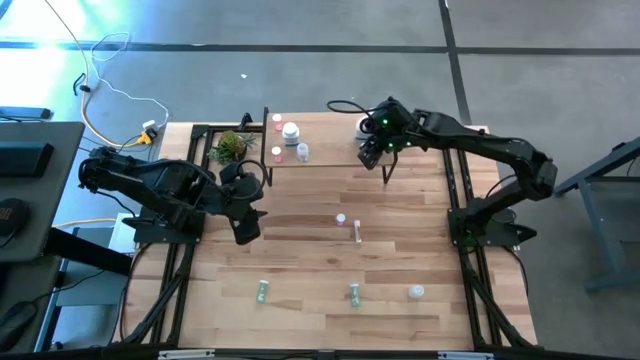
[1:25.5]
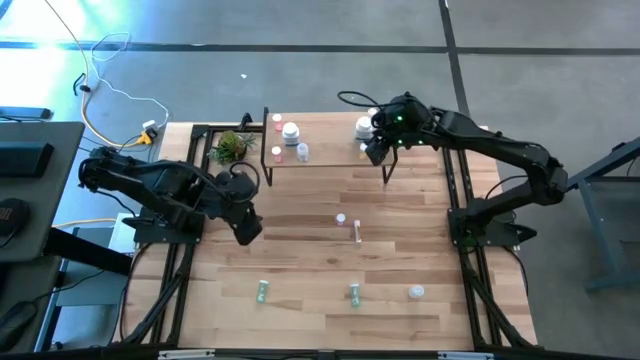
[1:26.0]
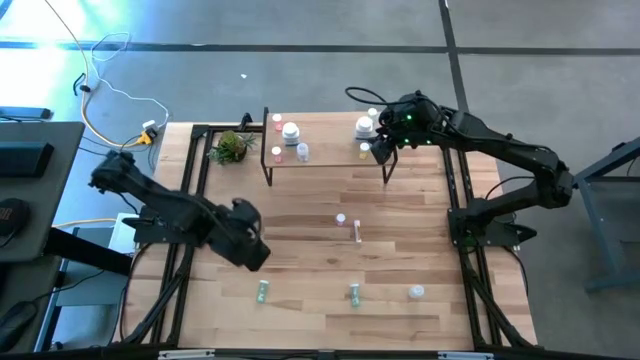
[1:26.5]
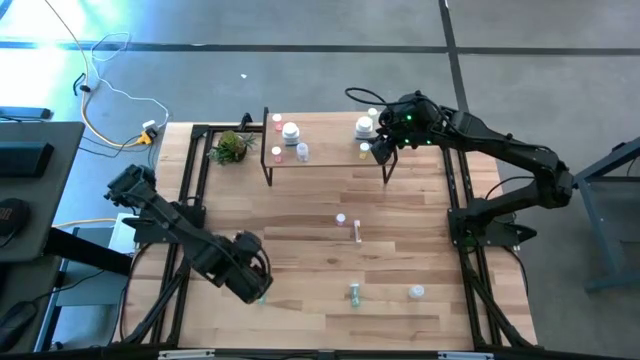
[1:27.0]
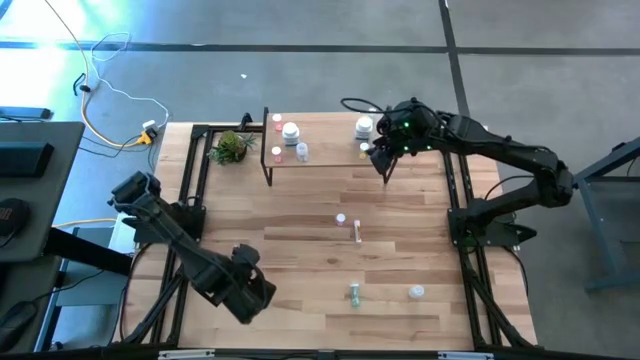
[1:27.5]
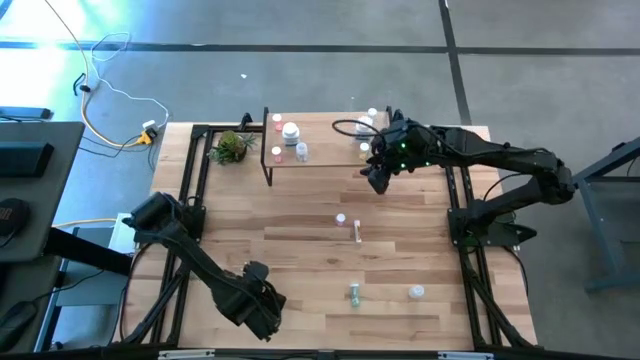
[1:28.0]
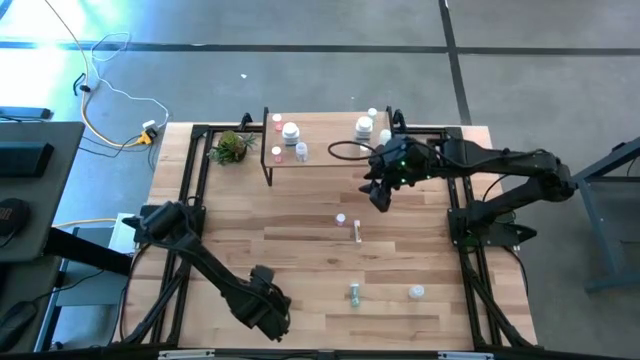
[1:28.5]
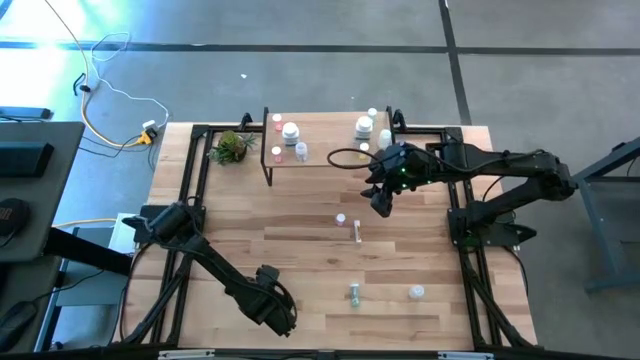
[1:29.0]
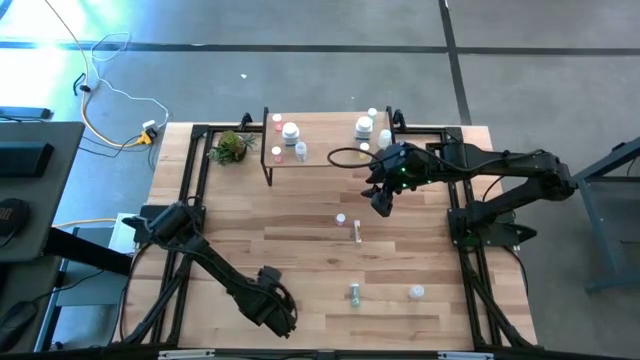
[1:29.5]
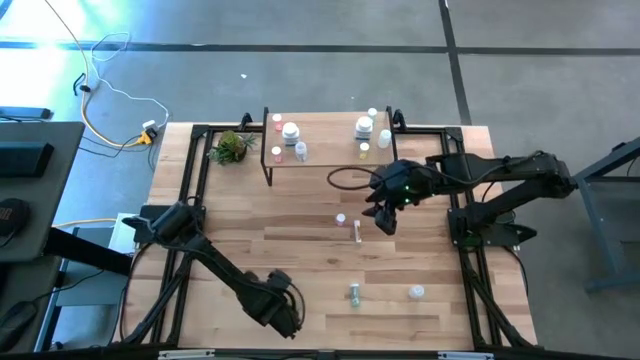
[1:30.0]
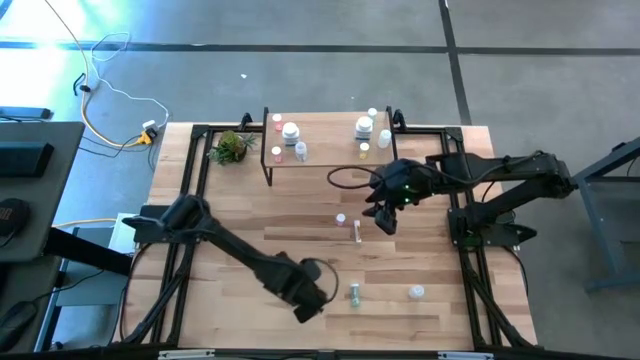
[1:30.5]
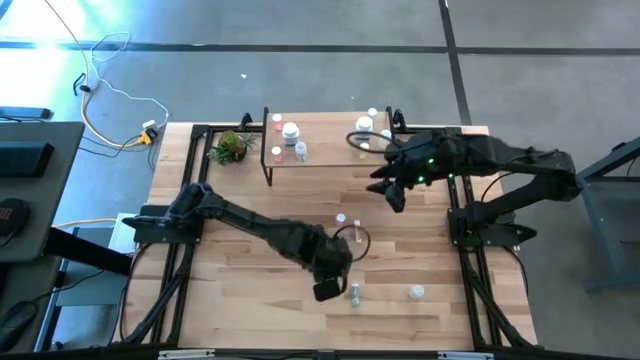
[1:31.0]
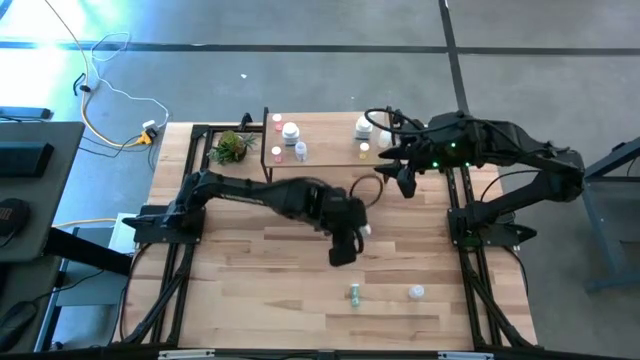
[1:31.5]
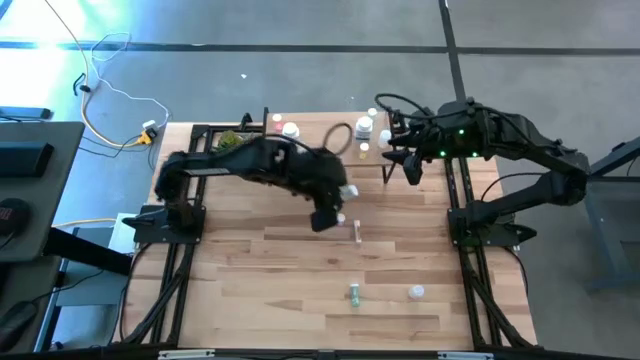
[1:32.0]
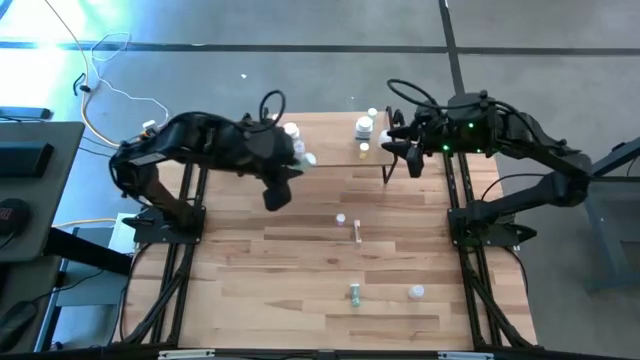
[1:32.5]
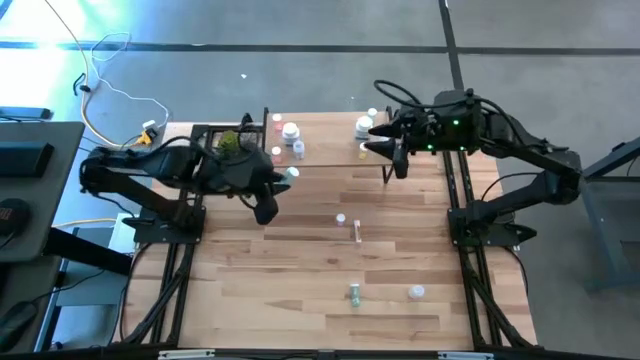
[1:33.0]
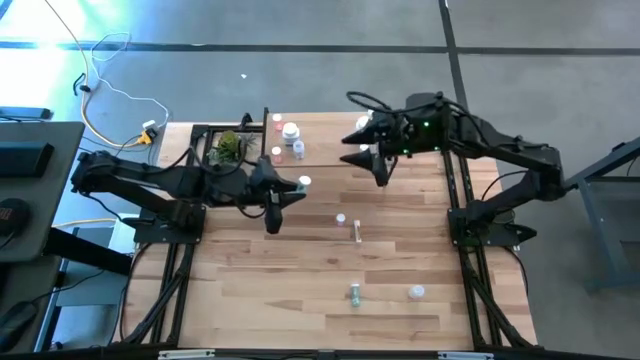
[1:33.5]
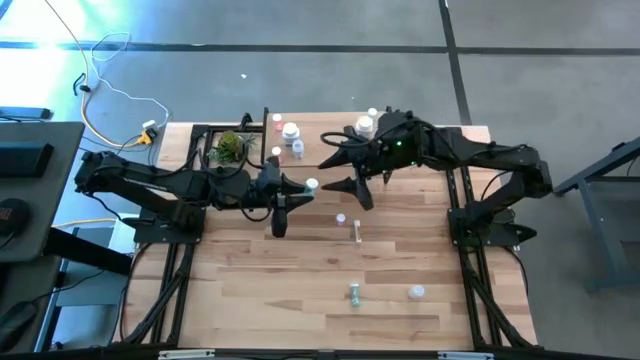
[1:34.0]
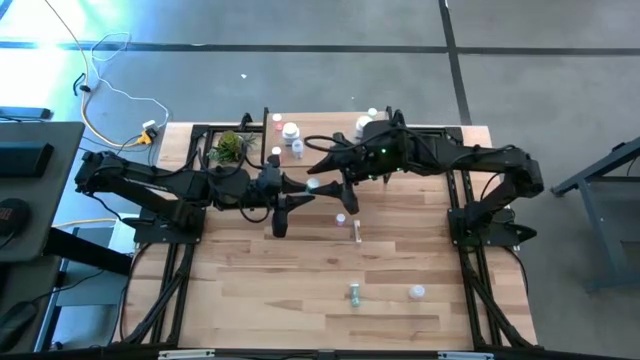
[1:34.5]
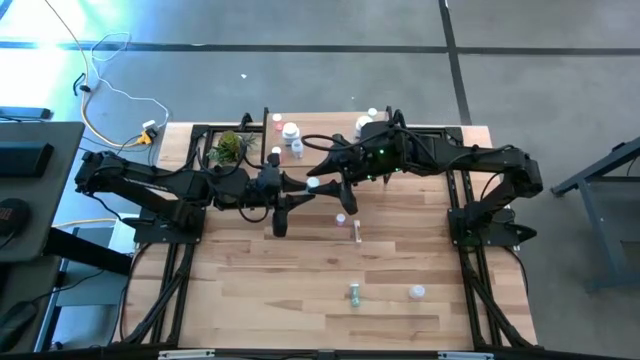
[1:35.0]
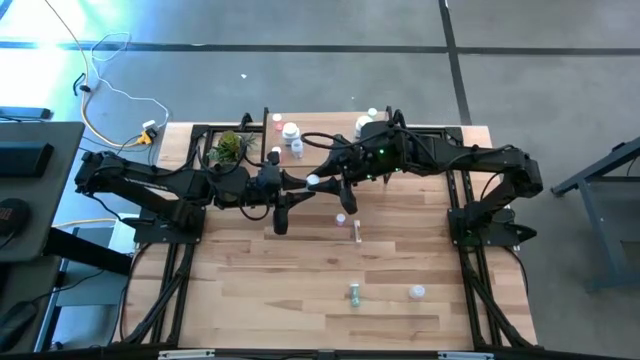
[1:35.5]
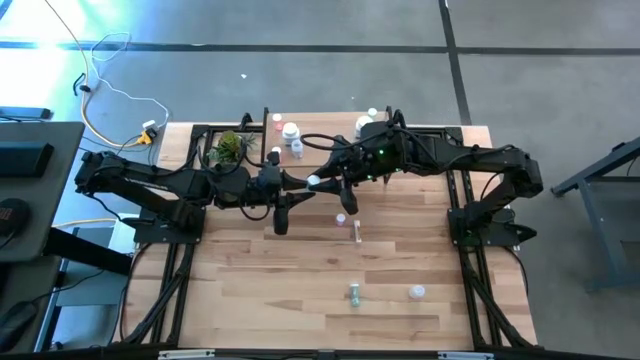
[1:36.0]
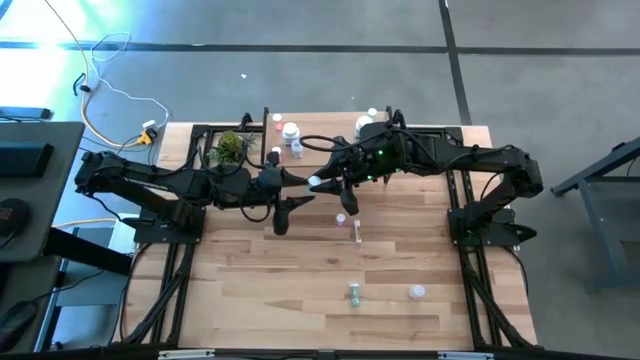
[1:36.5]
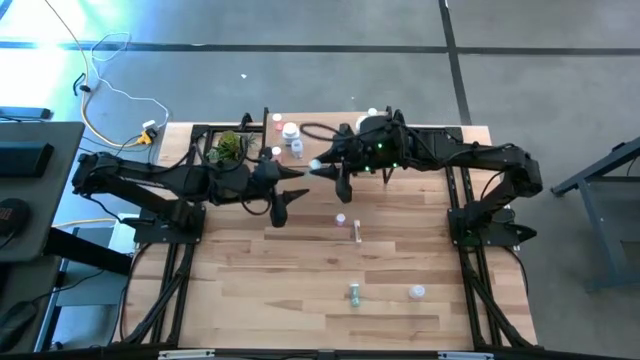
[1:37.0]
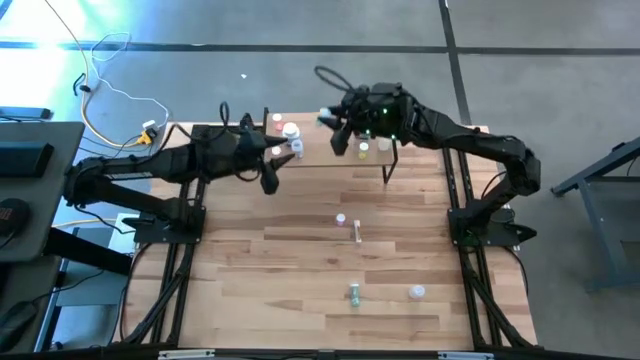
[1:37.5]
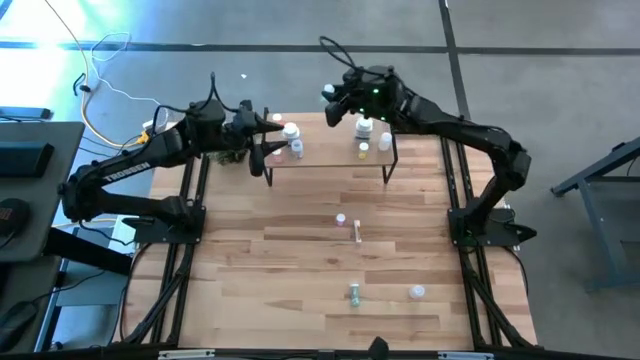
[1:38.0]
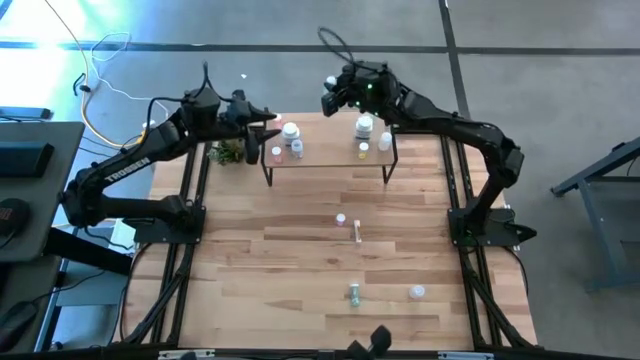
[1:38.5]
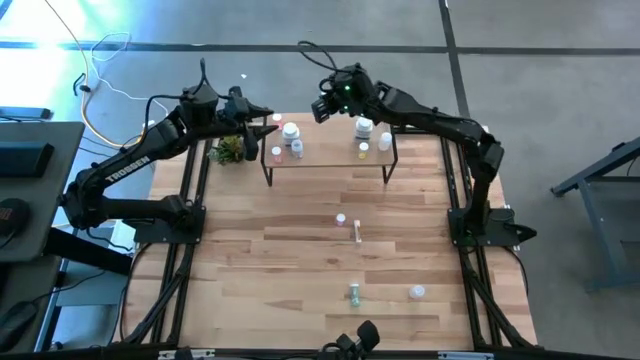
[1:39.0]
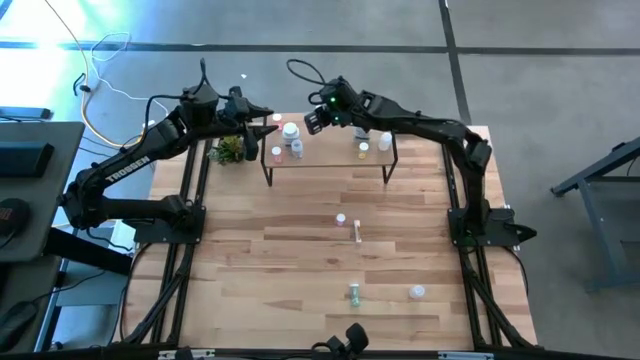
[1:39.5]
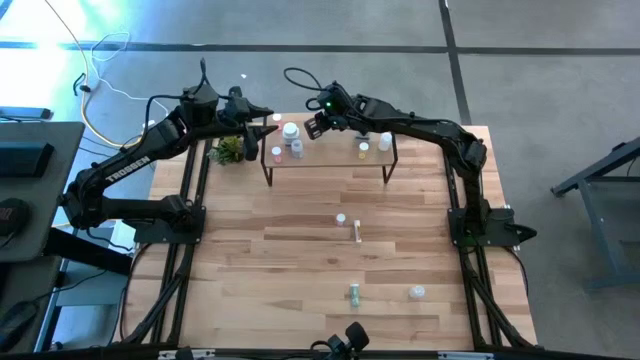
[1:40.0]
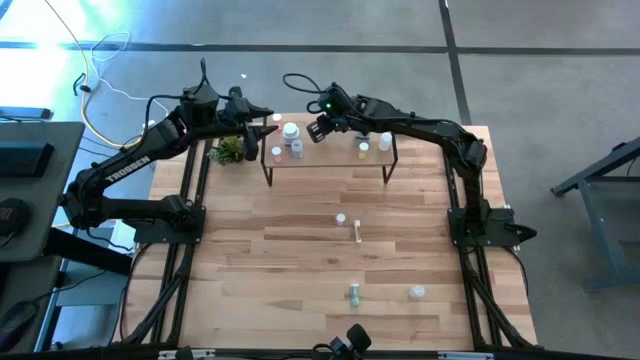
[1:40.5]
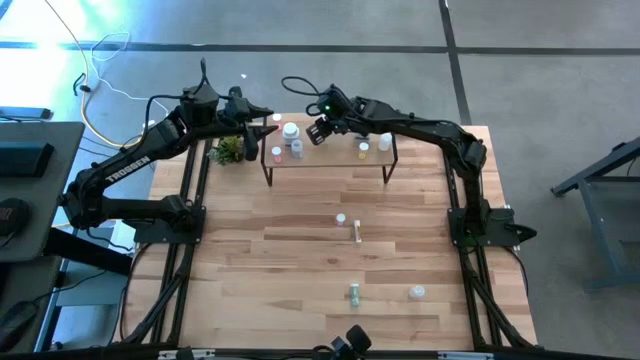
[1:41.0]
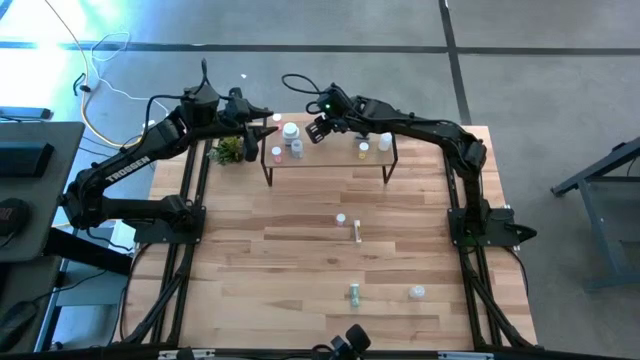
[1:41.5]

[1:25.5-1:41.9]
Task: Pick and place medicine bottles onto shelf by color
Put the left green pill bottle on the shelf

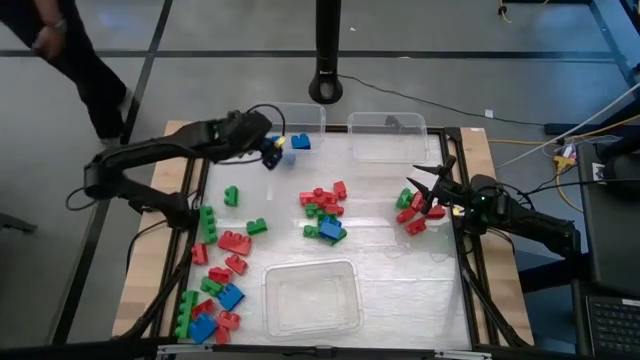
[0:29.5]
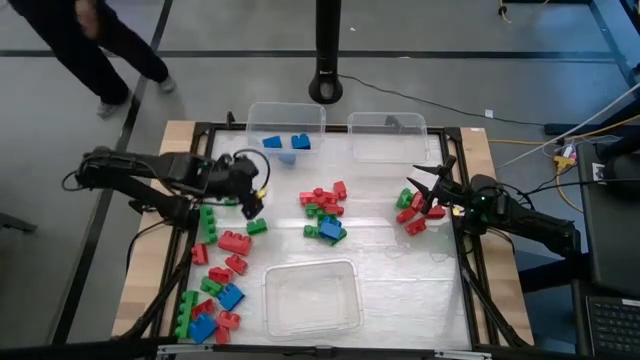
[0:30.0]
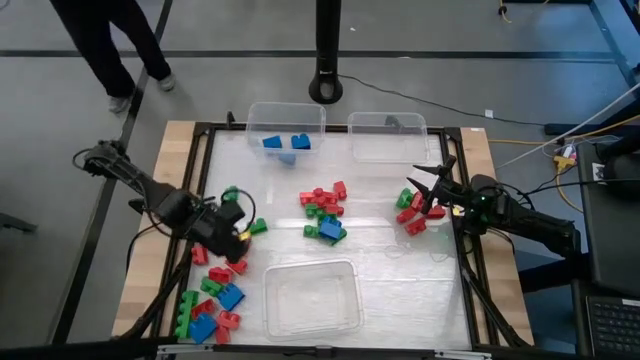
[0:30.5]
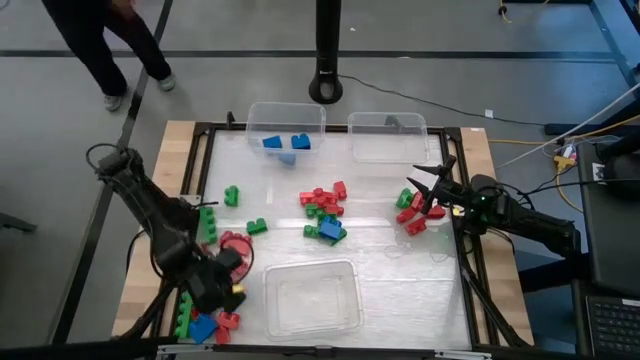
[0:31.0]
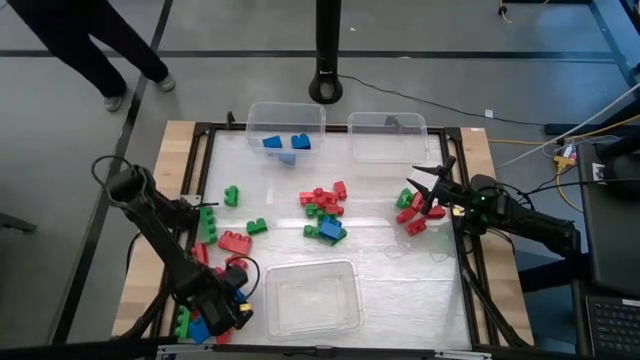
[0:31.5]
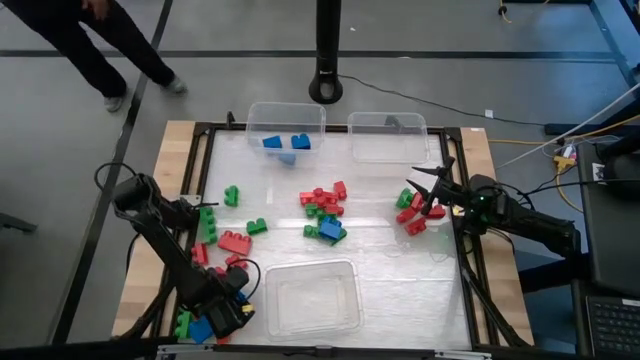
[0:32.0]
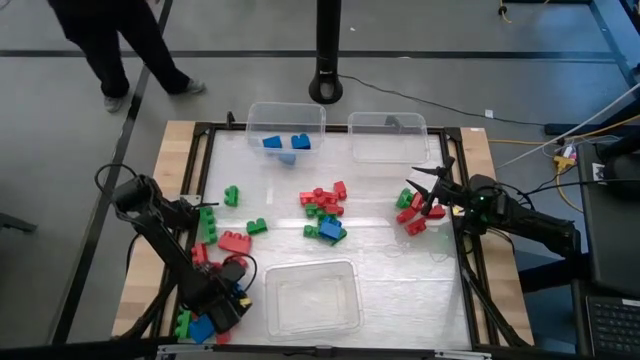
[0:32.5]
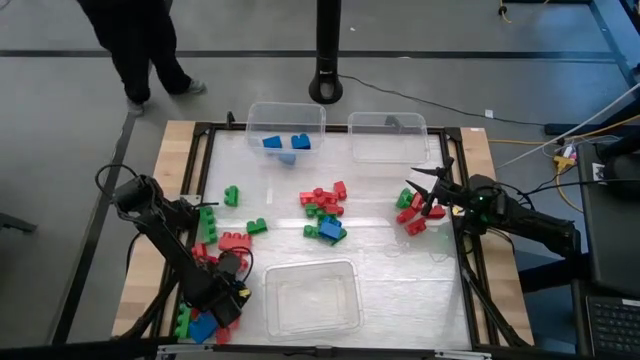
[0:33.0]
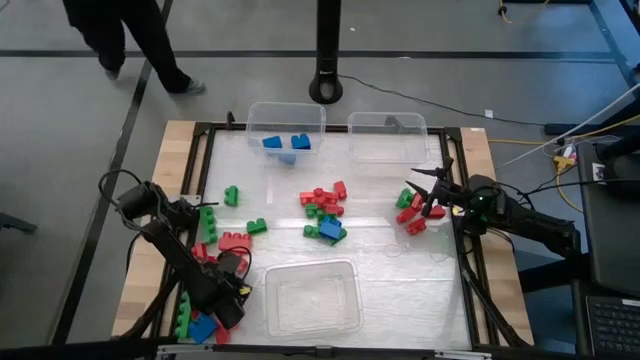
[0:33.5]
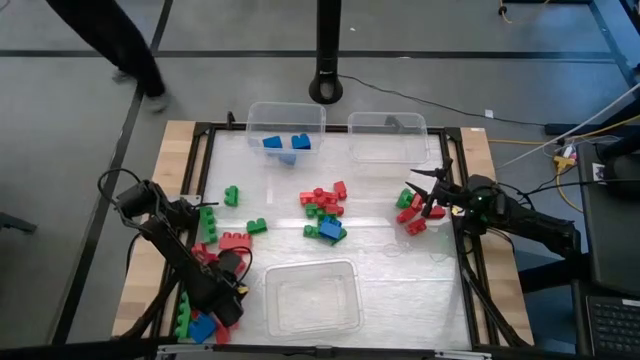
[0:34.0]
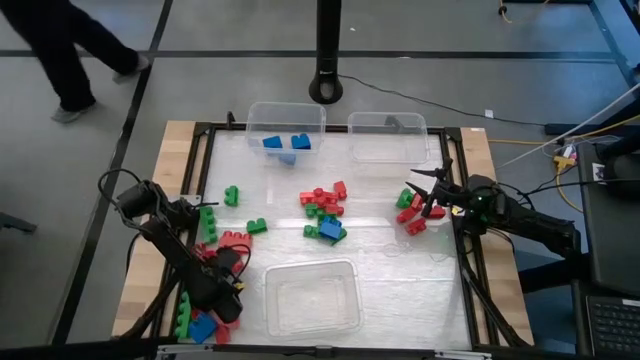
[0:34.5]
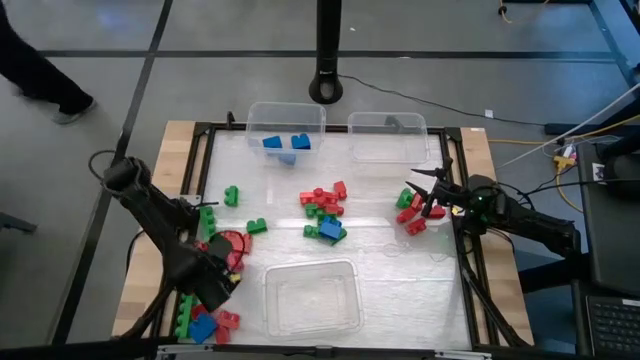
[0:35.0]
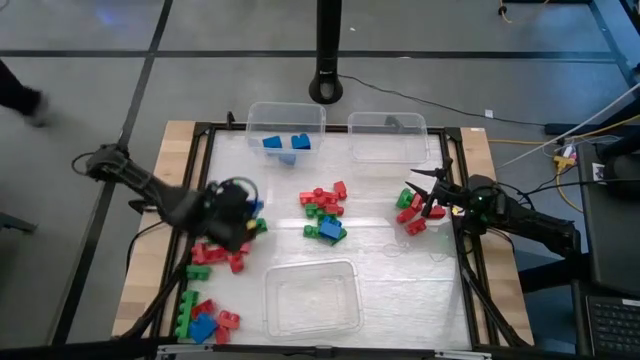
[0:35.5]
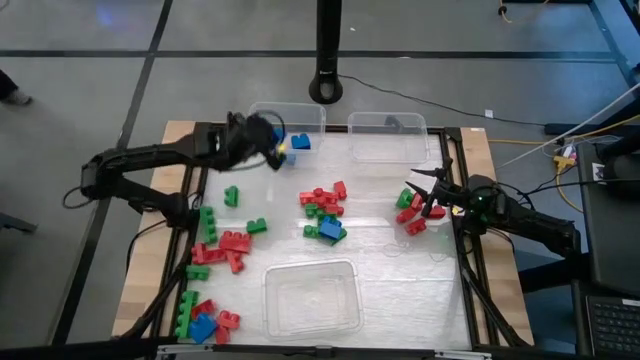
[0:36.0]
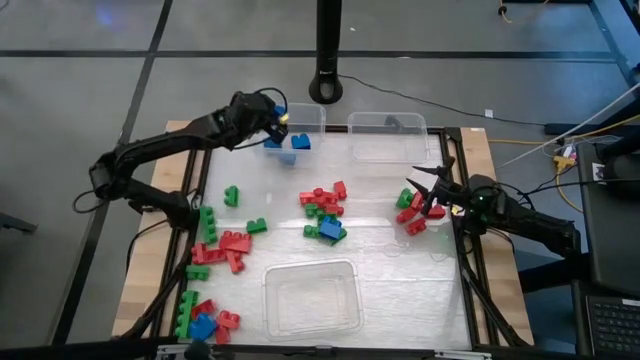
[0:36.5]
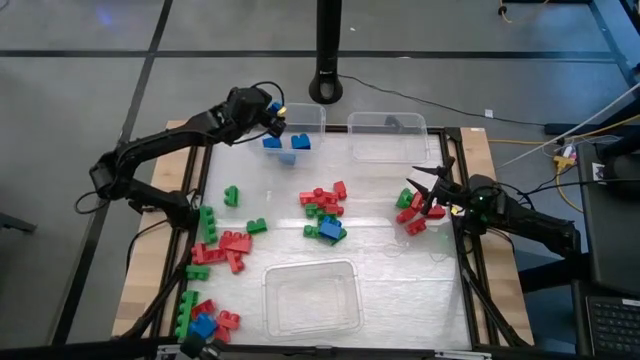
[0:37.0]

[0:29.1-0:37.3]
Task: Sort blocks
Put the blue game piece into the top left transparent bin
